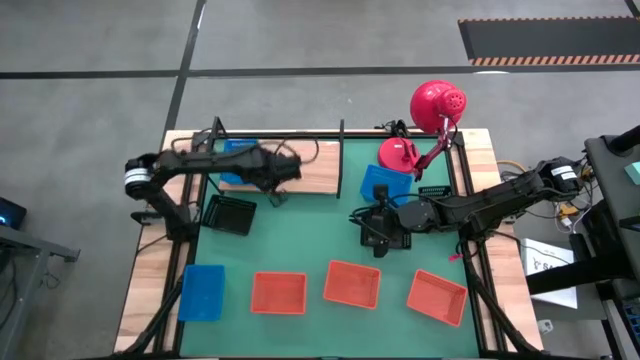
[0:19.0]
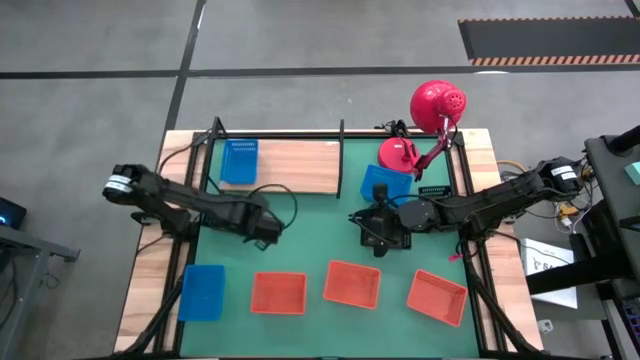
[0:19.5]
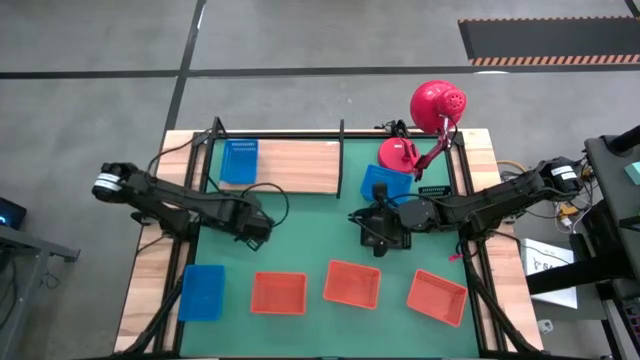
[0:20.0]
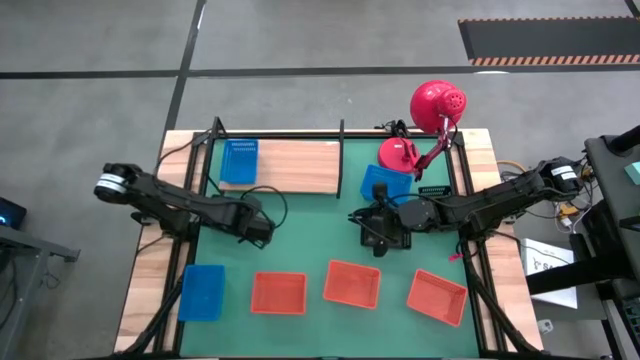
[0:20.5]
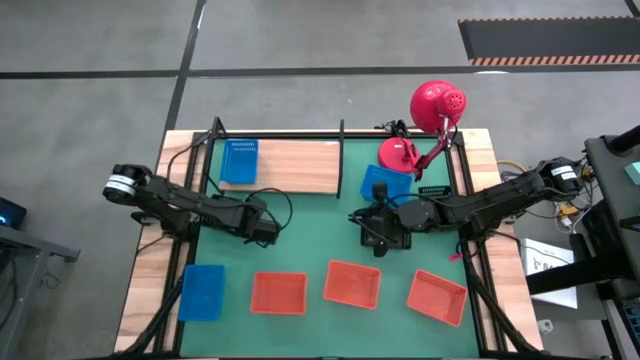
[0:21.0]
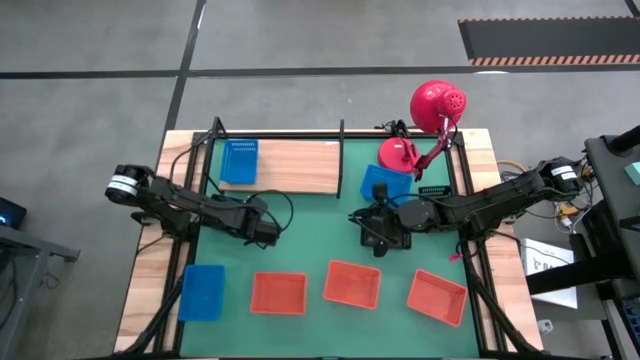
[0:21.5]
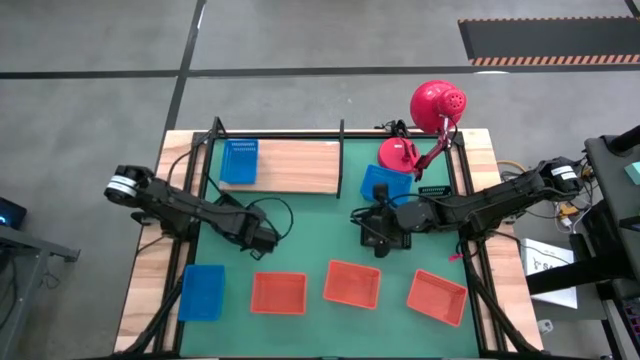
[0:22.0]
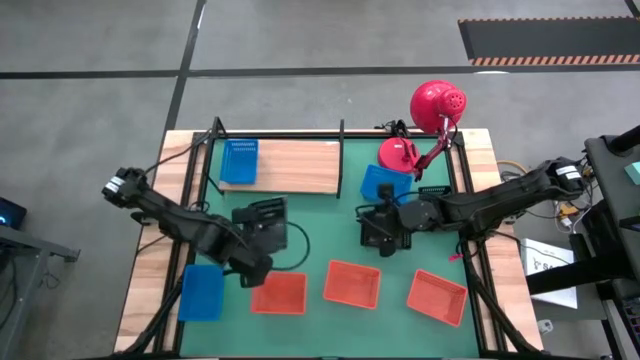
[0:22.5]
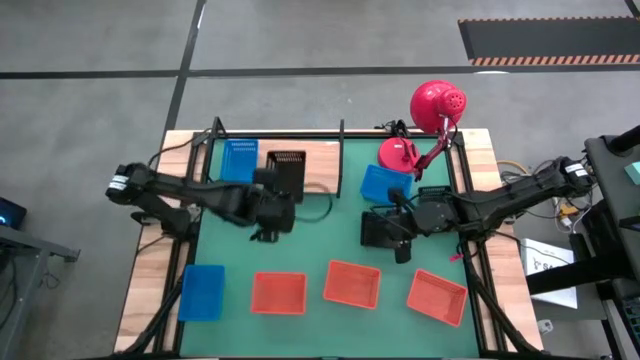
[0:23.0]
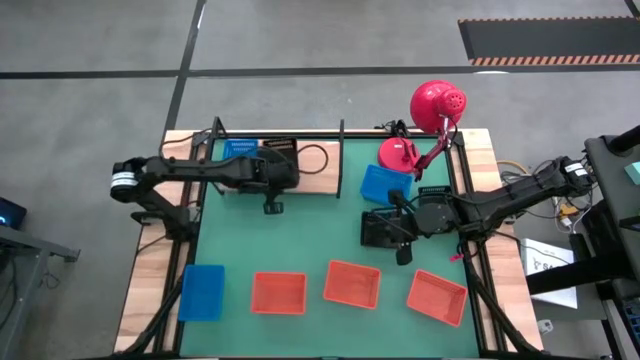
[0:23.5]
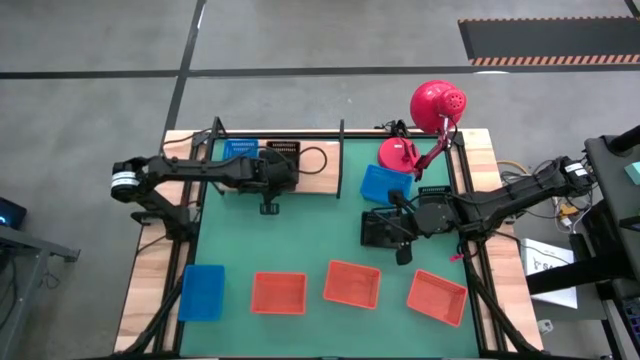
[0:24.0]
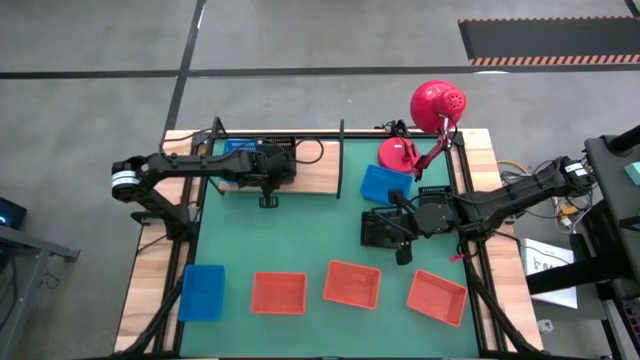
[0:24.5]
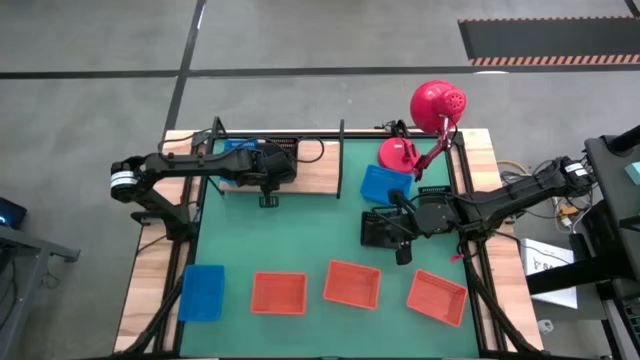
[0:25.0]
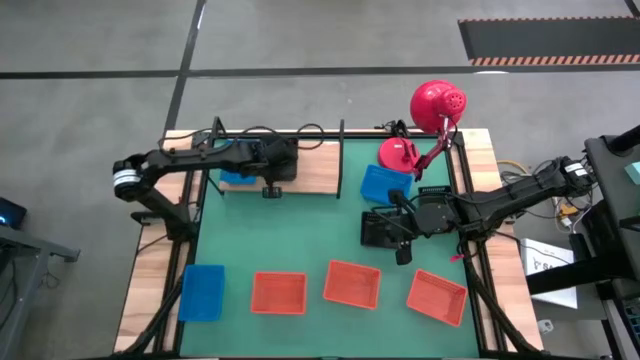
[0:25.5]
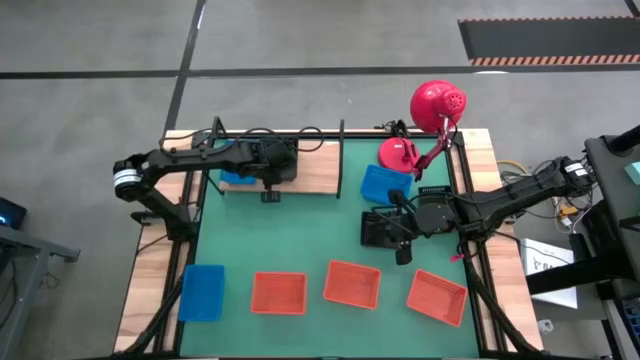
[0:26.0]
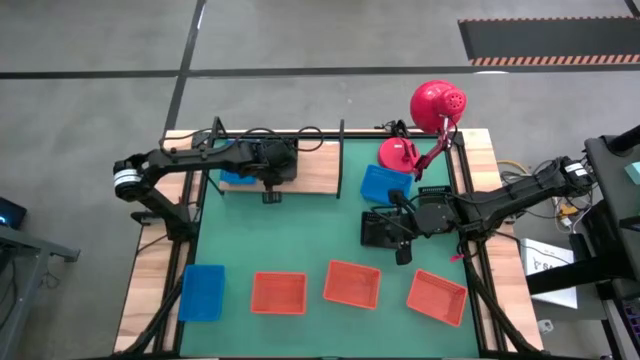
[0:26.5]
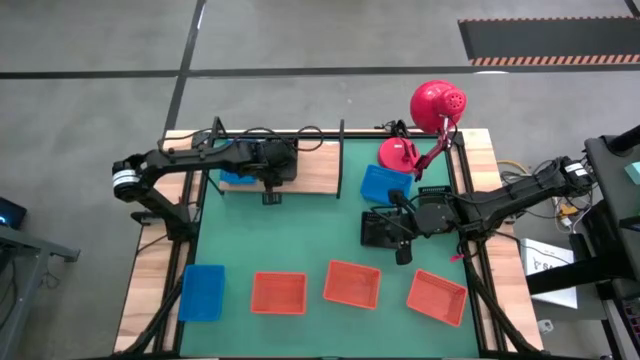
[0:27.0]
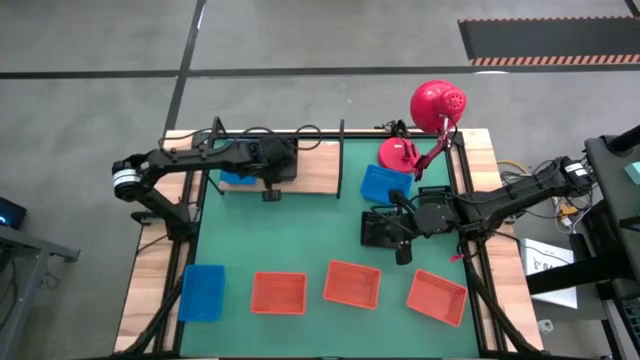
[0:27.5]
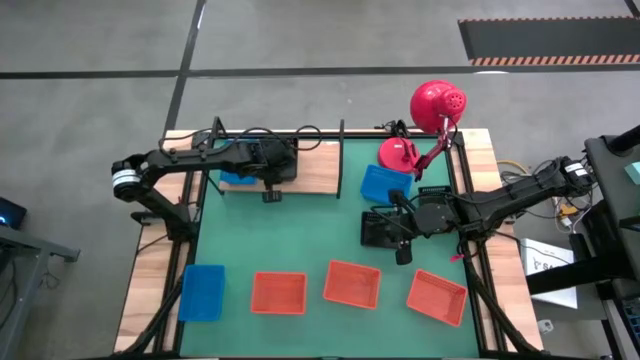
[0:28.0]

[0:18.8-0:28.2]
Task: Stack baskets on shelf by color
Put the left black bin on the shelf

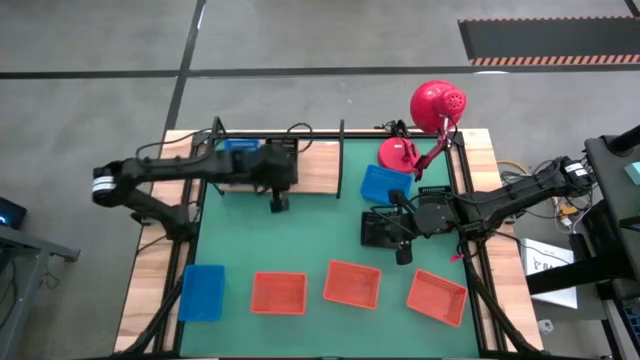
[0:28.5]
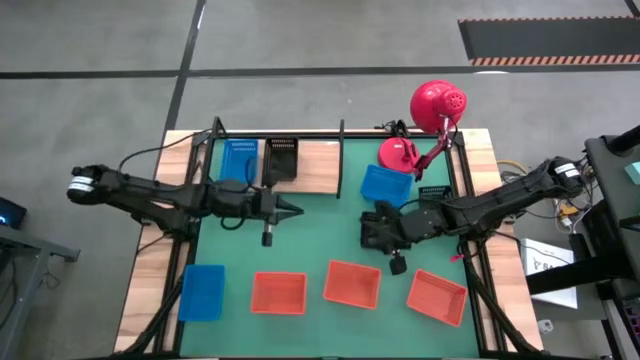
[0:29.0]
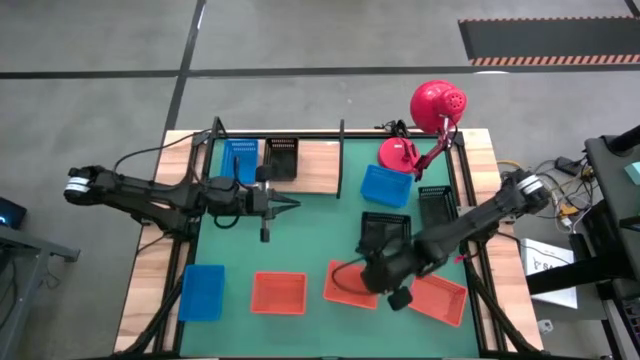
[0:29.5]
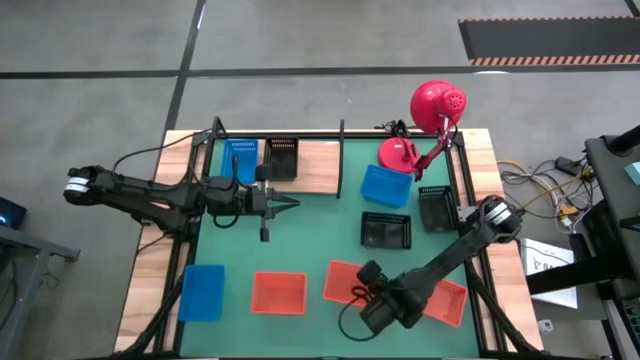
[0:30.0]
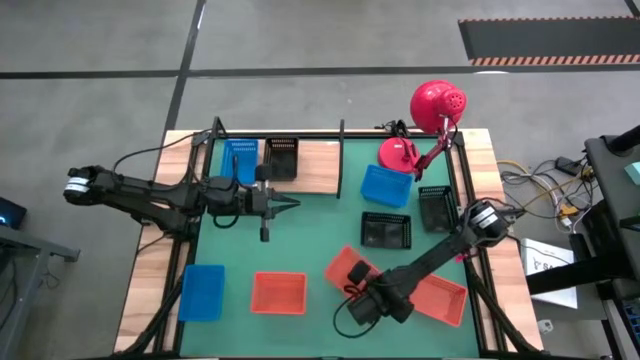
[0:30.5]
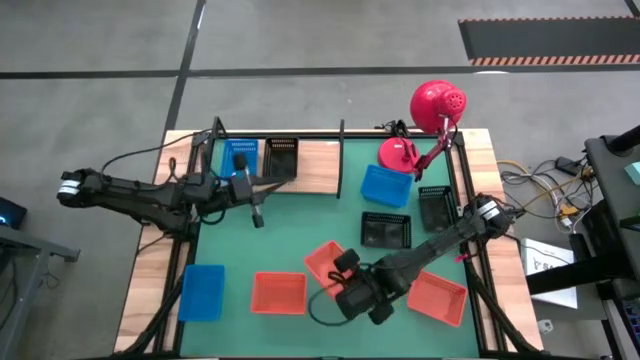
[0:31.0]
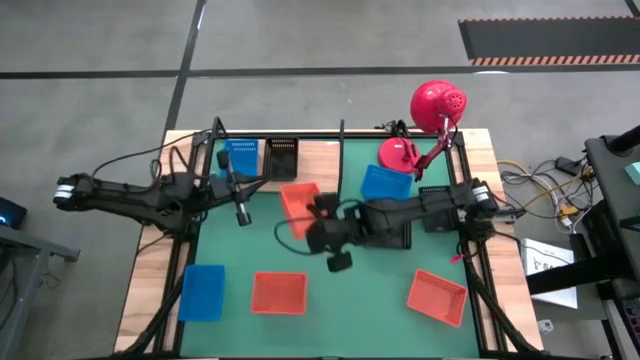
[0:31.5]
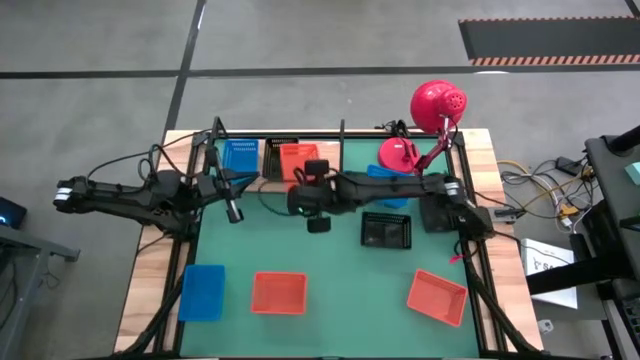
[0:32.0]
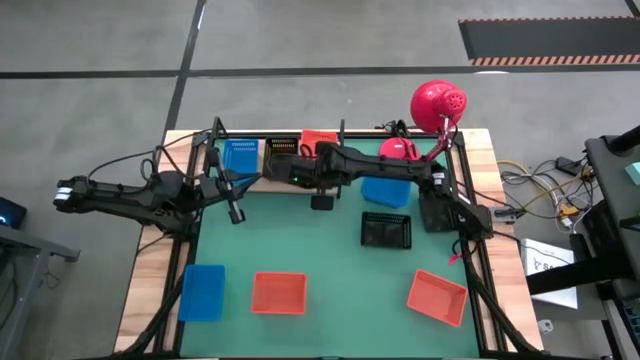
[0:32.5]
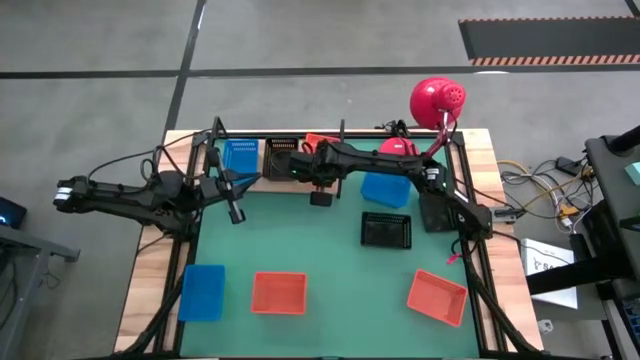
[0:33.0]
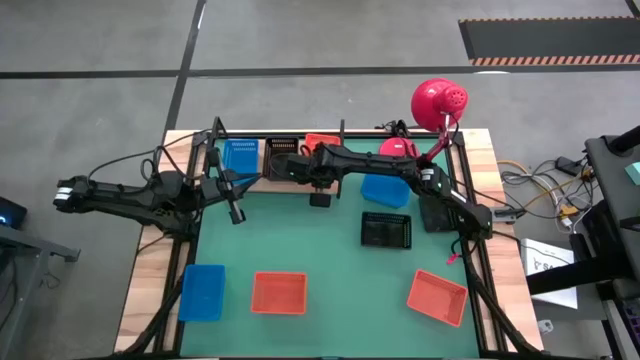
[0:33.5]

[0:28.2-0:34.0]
Put the middle orange bin on the shelf

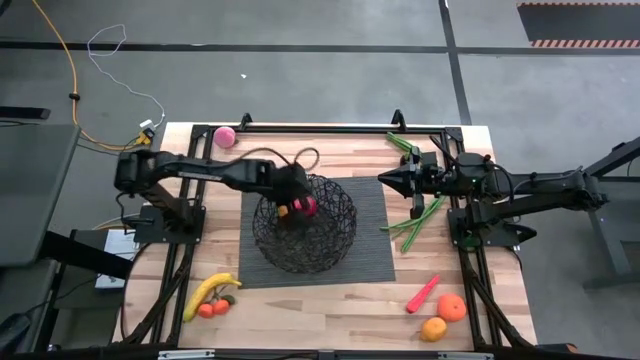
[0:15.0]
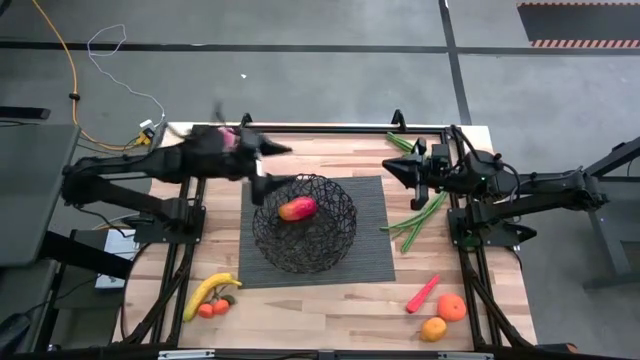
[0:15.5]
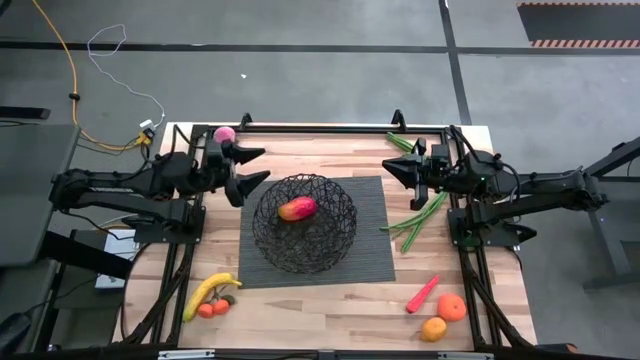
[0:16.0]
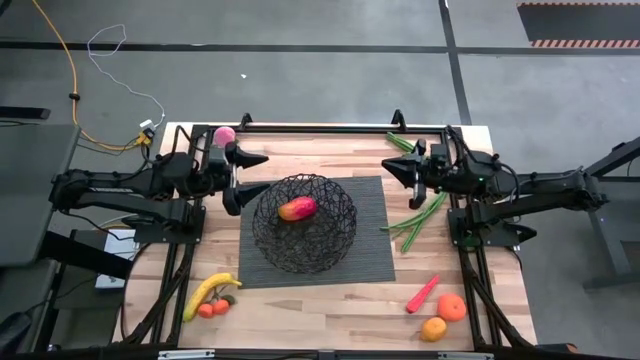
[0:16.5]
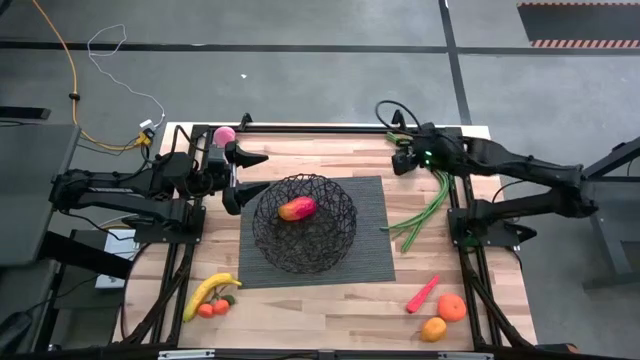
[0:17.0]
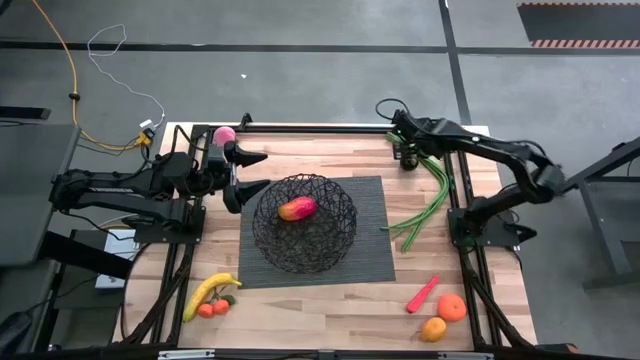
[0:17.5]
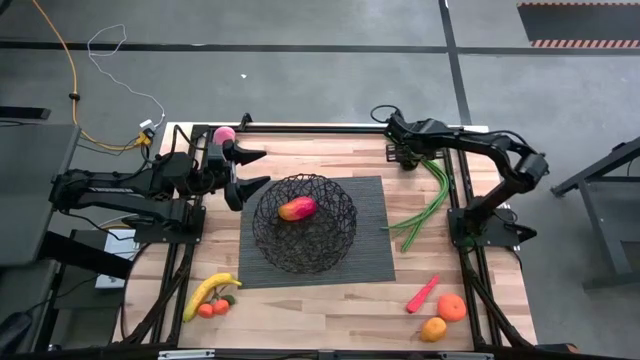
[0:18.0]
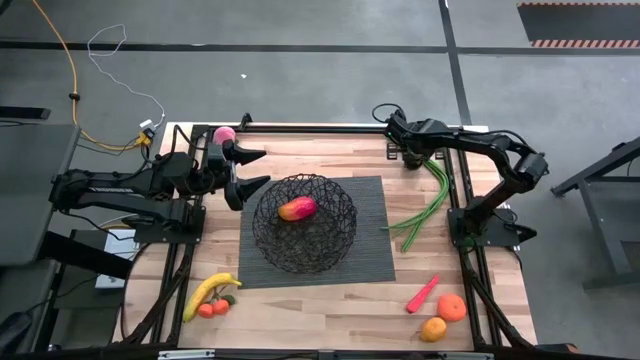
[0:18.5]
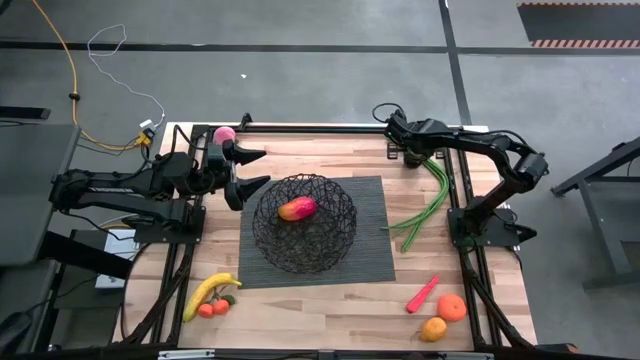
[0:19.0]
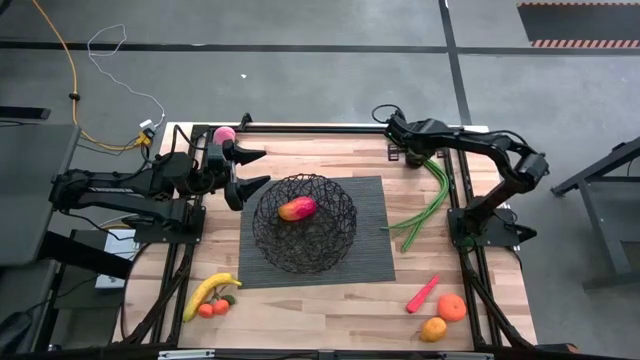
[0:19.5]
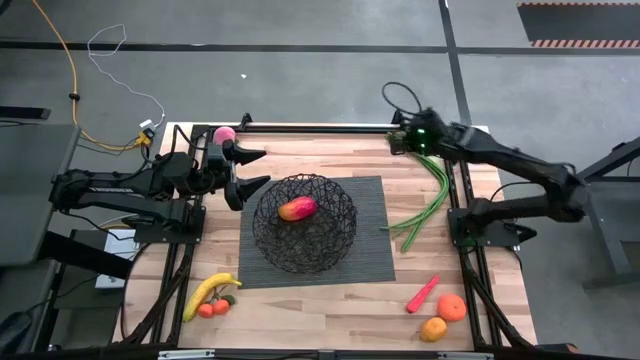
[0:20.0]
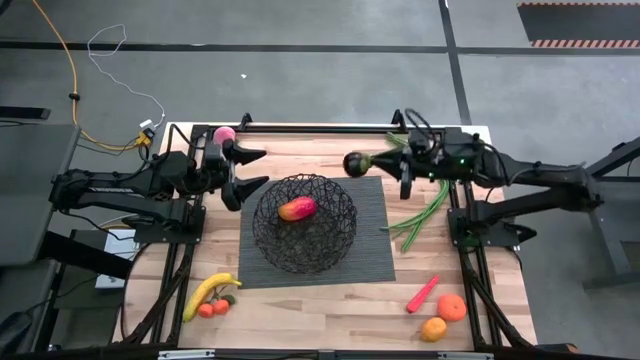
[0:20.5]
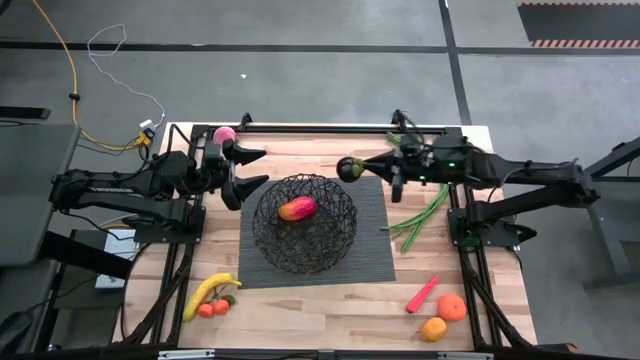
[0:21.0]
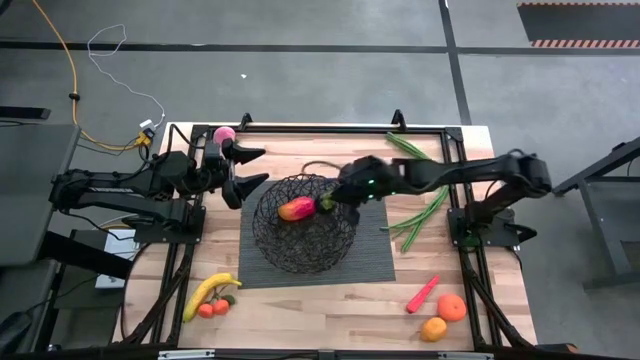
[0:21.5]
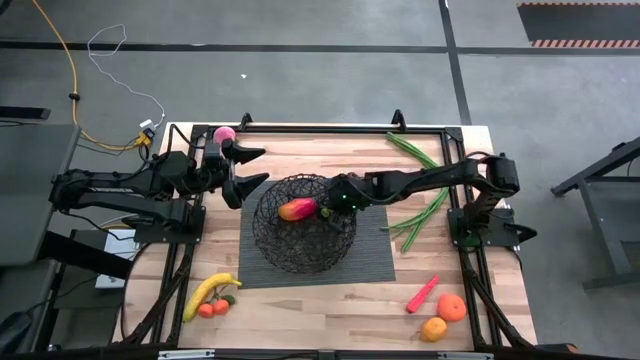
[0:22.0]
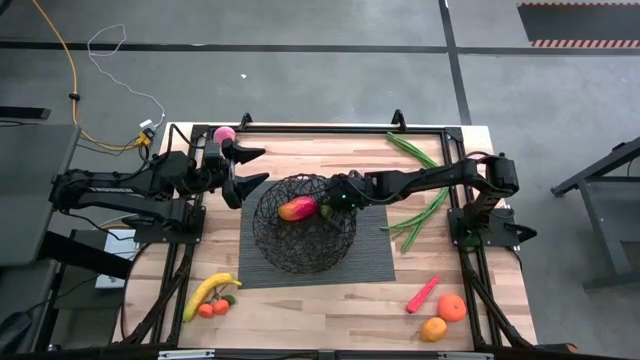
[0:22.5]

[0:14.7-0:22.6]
Task: Build produce basket
Put the purple mangosteen into the black mesh basket
